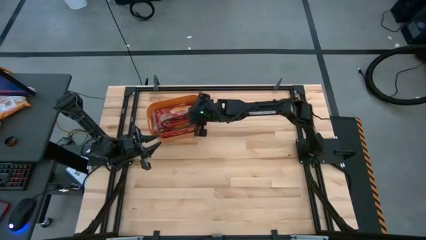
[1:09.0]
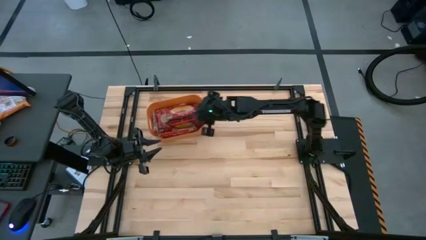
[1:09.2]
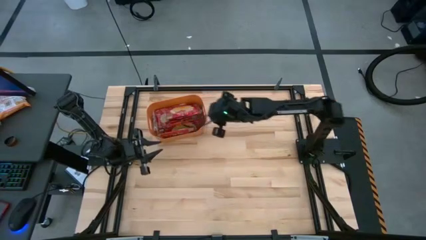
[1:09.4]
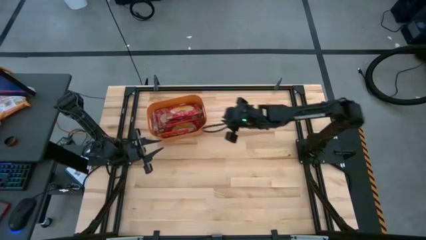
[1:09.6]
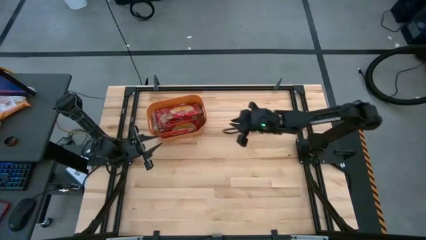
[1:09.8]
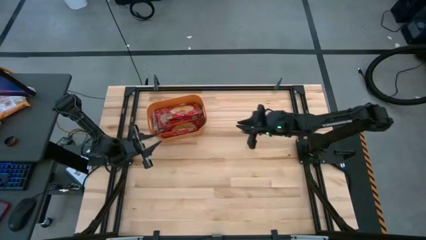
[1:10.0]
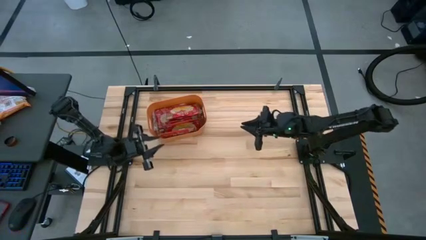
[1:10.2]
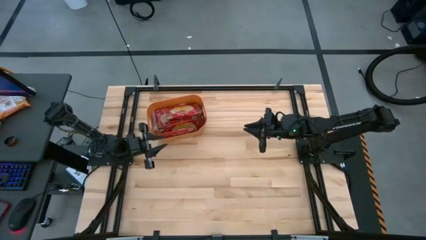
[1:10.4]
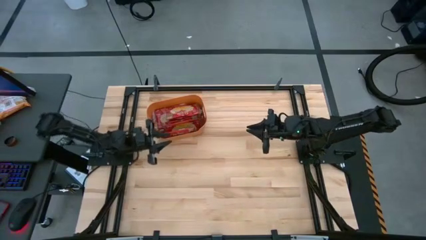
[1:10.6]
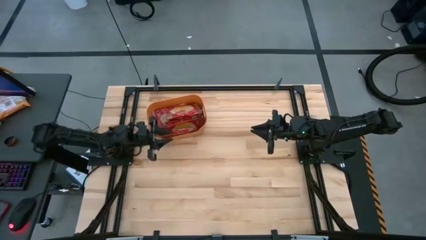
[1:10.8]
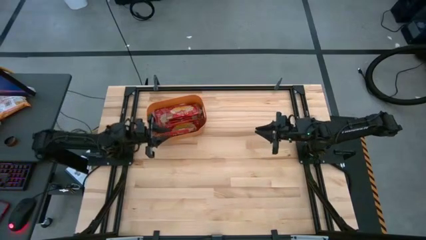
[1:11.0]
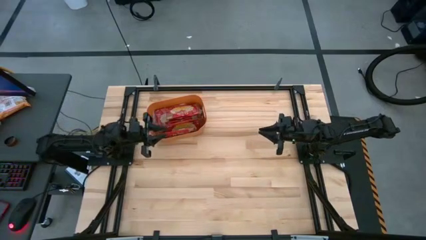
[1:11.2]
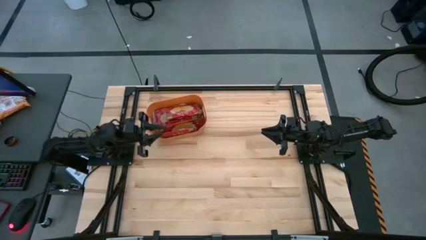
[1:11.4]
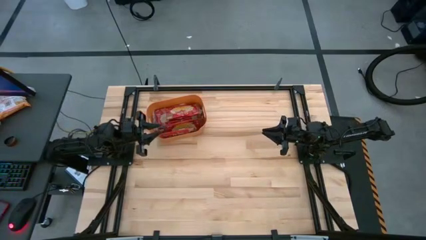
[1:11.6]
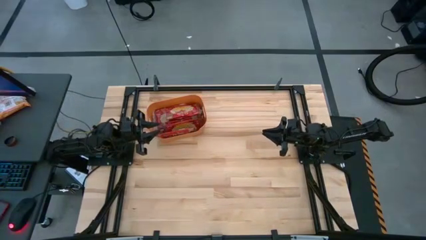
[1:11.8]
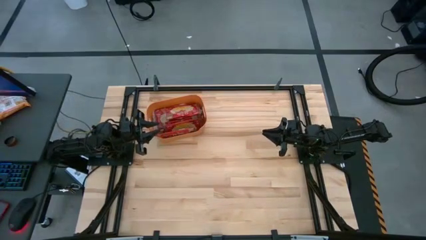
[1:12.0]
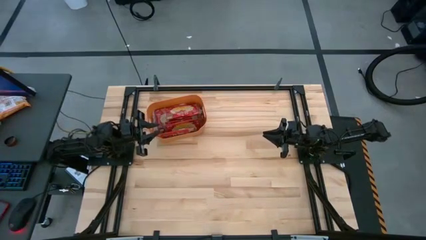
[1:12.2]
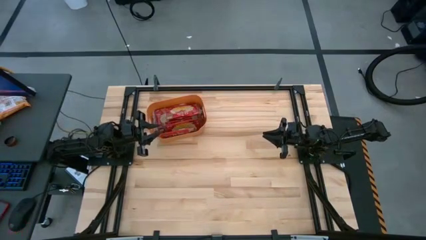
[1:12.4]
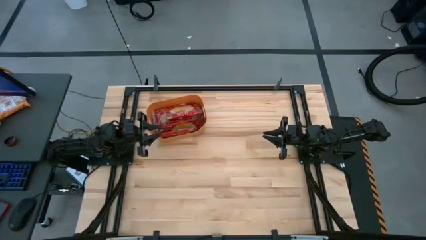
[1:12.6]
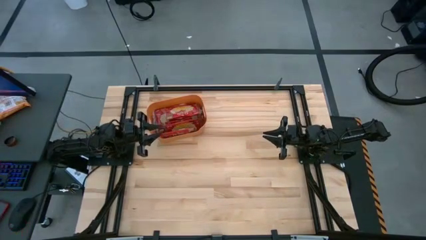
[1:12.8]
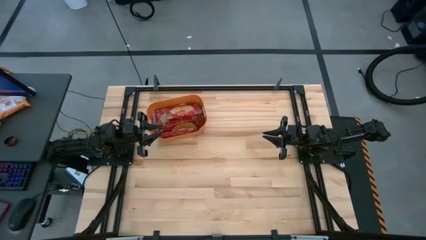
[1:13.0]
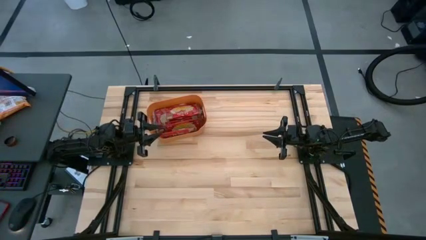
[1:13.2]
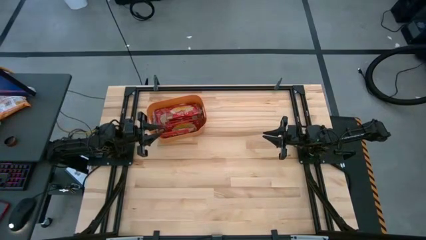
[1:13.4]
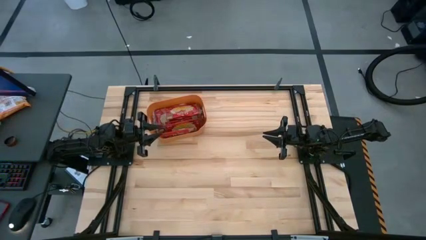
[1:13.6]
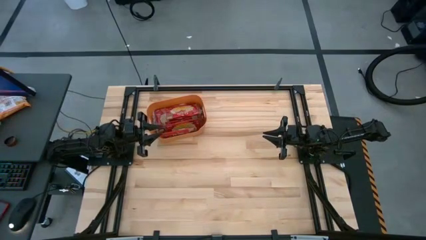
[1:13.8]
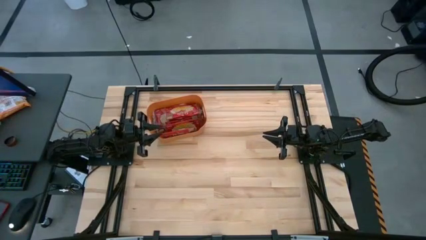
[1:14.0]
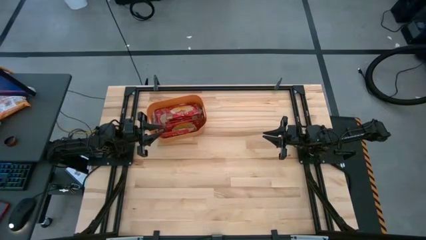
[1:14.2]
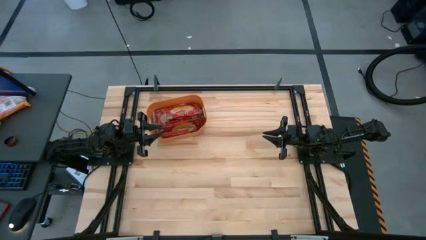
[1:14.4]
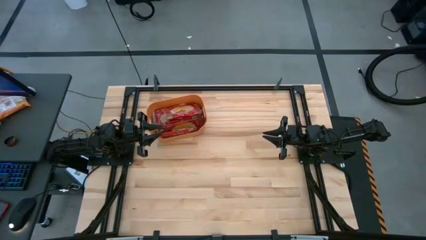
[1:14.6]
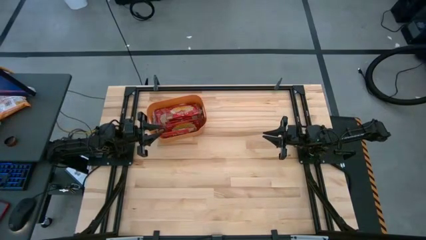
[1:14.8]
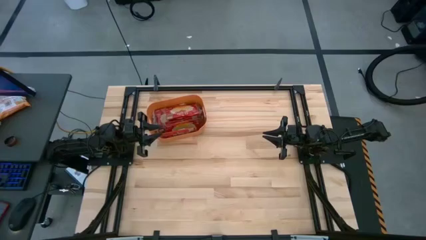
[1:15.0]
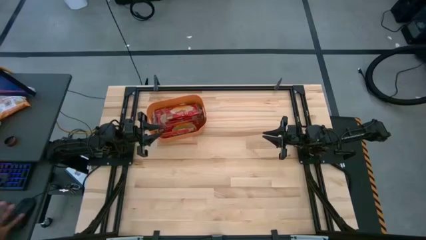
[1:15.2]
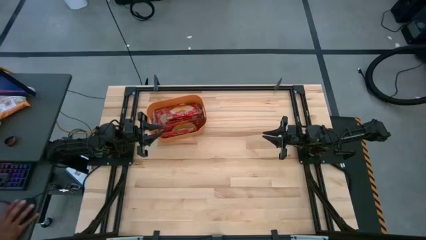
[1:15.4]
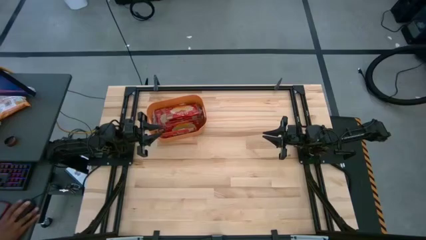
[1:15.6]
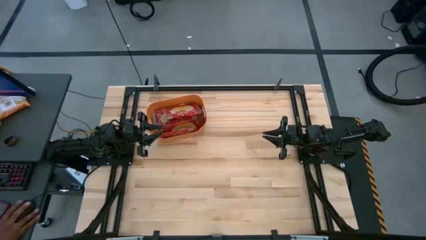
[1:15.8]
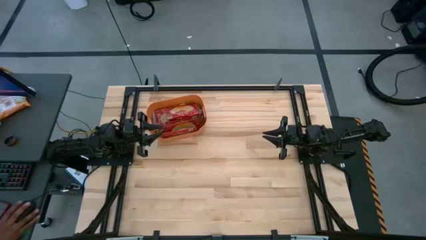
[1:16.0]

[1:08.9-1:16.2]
Task: Sort popcorn bags into baskets
Return to Home Position

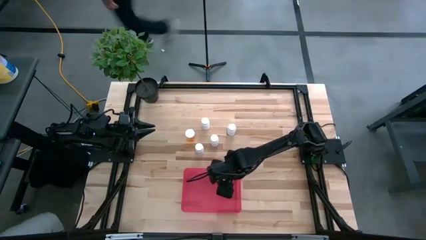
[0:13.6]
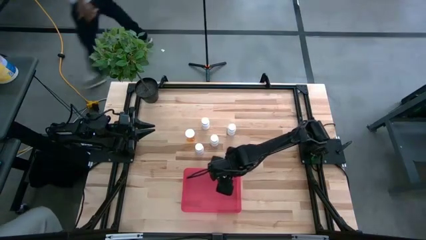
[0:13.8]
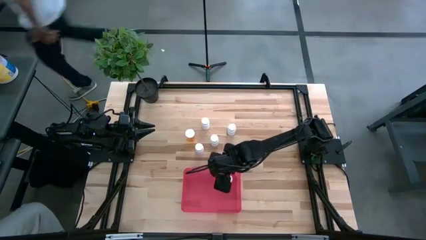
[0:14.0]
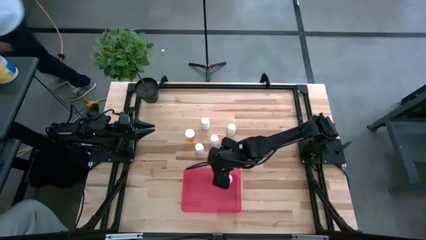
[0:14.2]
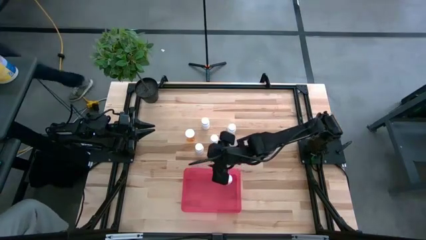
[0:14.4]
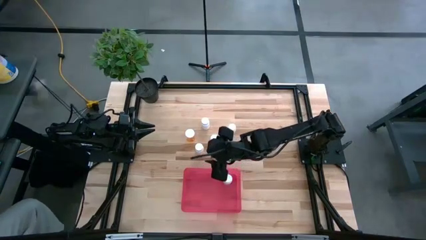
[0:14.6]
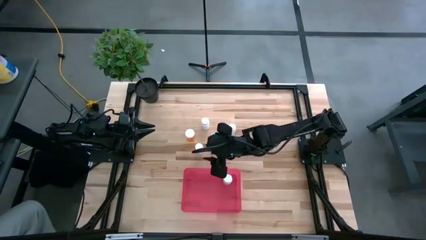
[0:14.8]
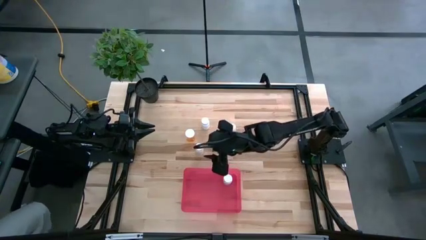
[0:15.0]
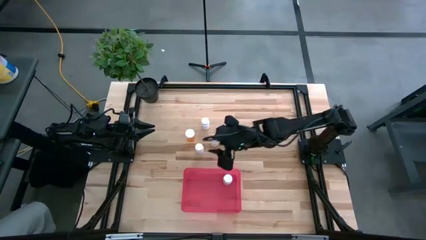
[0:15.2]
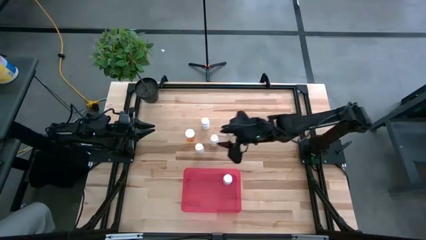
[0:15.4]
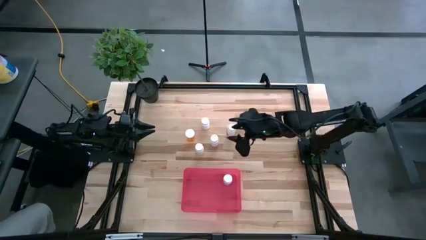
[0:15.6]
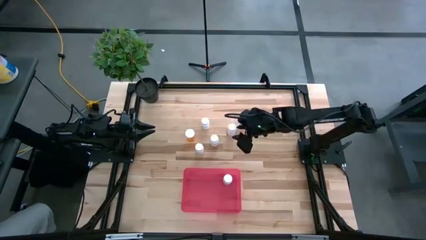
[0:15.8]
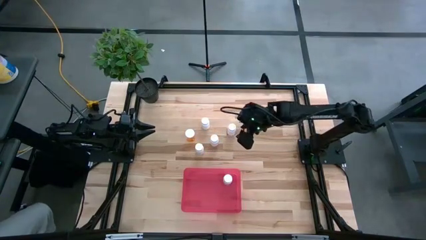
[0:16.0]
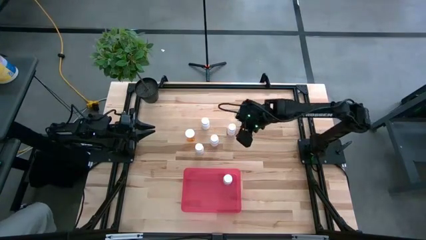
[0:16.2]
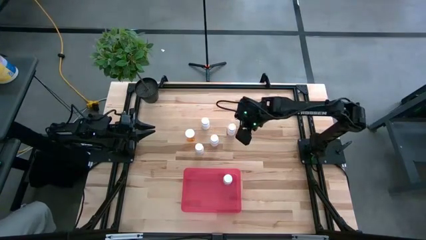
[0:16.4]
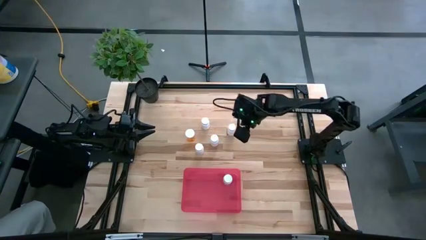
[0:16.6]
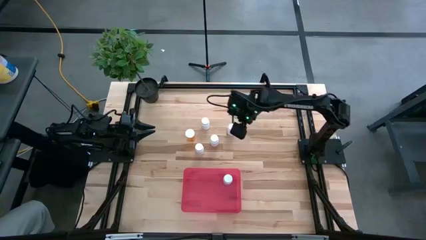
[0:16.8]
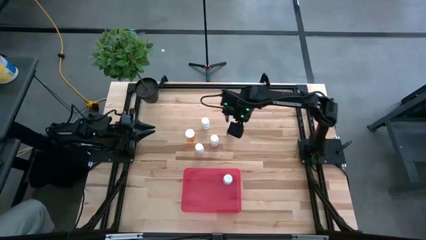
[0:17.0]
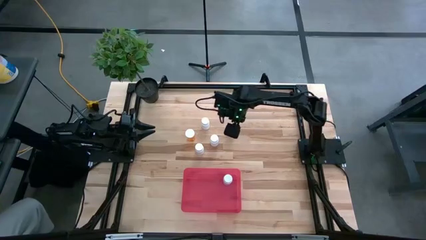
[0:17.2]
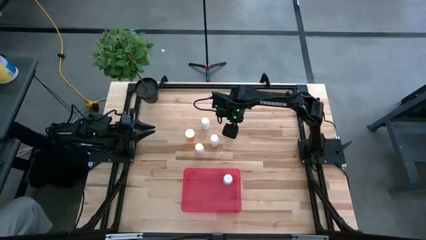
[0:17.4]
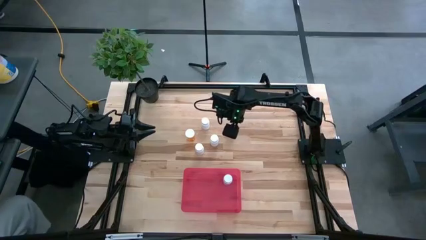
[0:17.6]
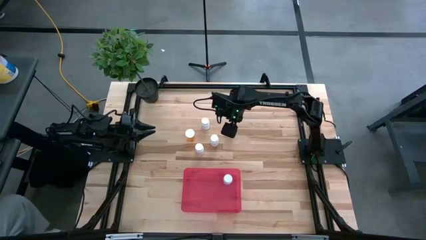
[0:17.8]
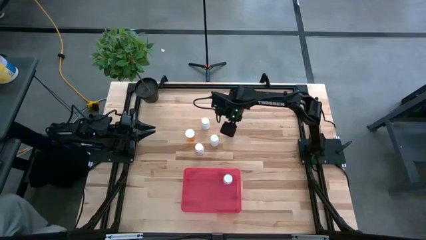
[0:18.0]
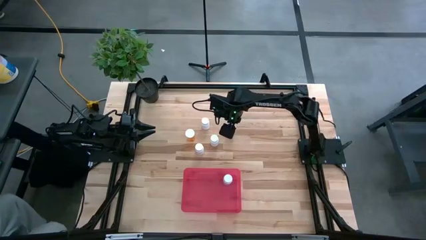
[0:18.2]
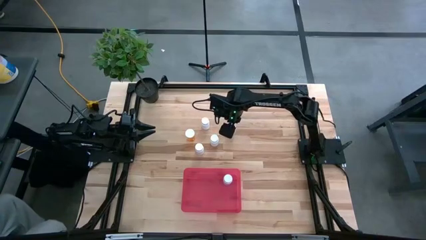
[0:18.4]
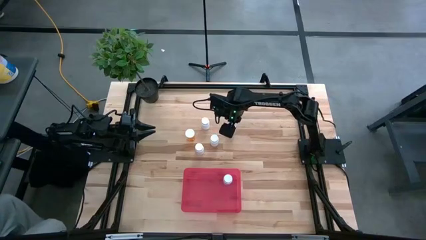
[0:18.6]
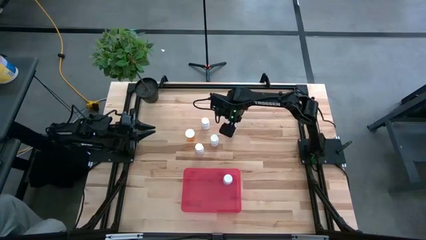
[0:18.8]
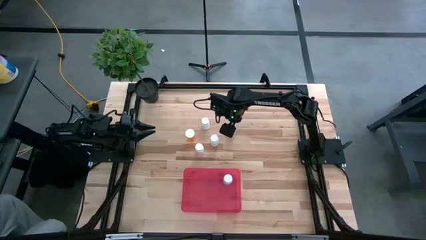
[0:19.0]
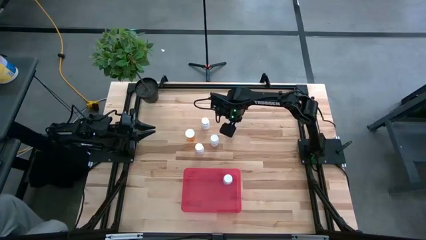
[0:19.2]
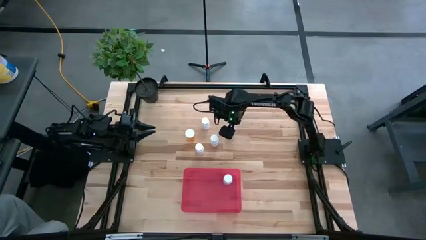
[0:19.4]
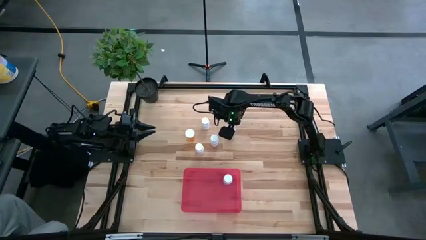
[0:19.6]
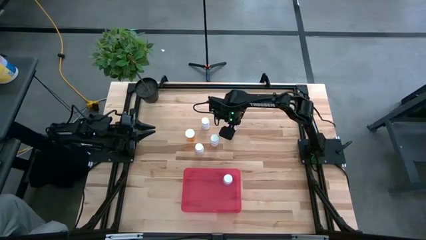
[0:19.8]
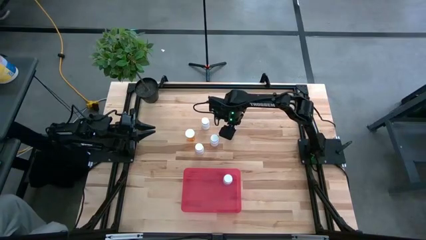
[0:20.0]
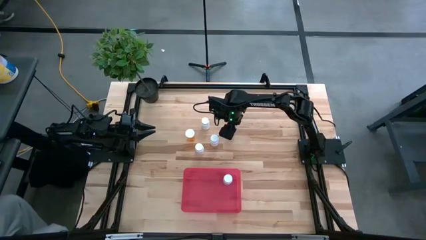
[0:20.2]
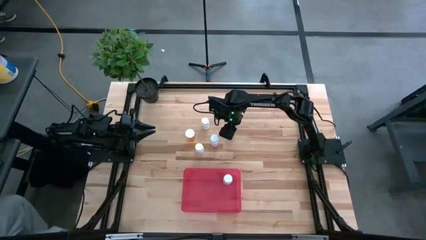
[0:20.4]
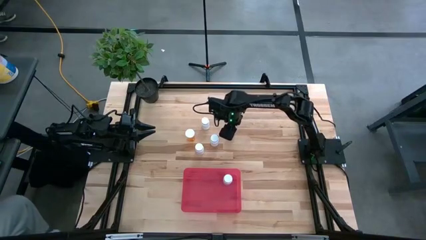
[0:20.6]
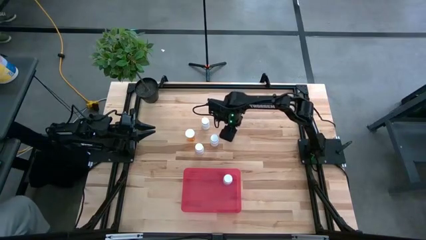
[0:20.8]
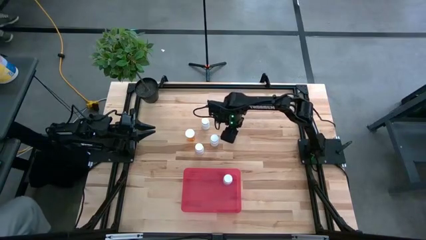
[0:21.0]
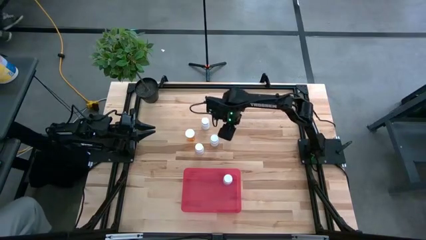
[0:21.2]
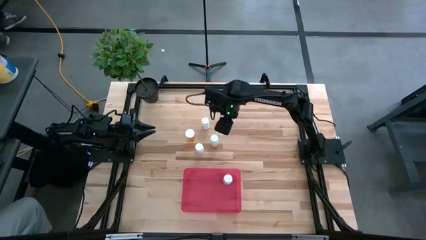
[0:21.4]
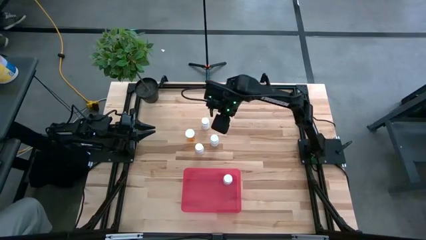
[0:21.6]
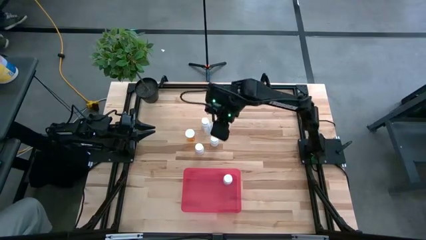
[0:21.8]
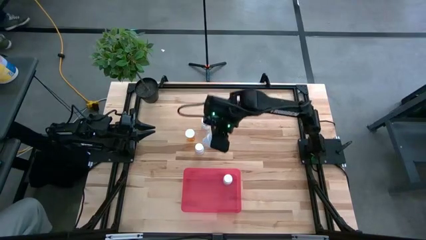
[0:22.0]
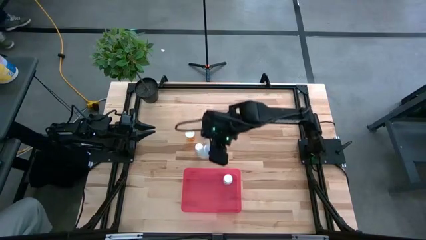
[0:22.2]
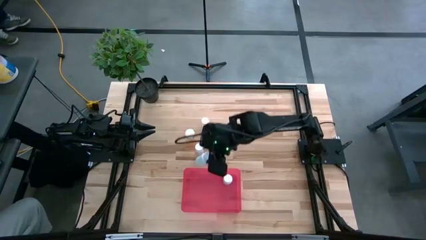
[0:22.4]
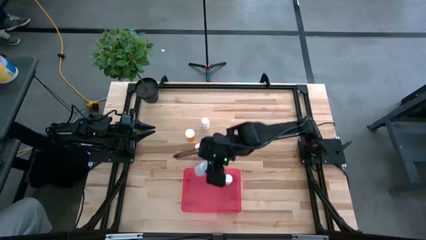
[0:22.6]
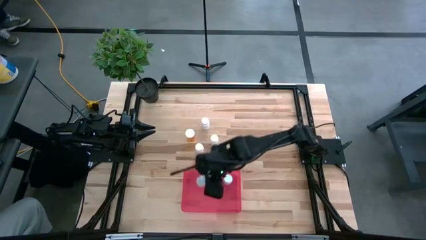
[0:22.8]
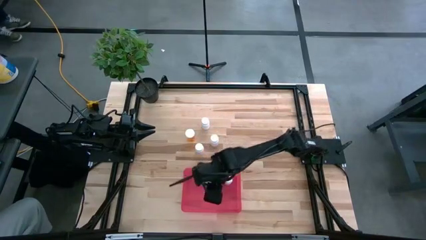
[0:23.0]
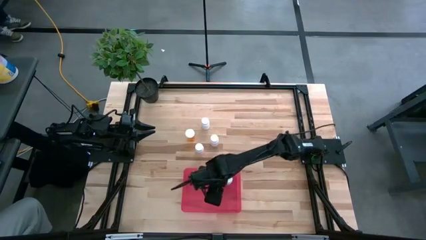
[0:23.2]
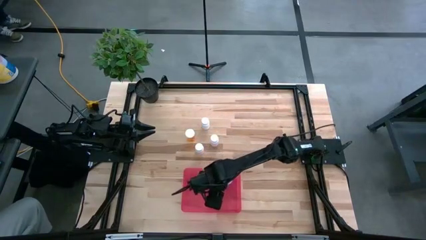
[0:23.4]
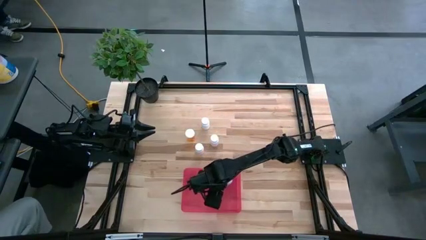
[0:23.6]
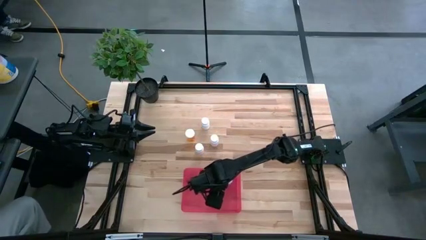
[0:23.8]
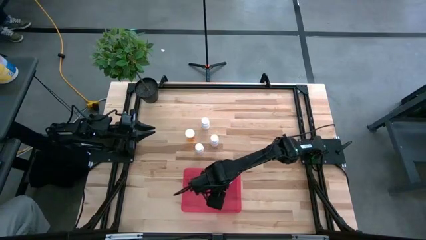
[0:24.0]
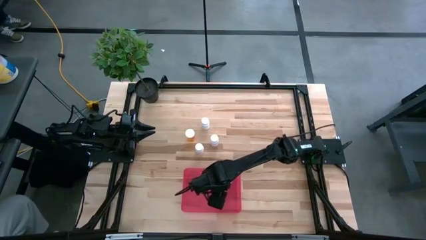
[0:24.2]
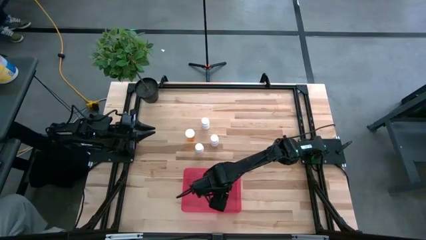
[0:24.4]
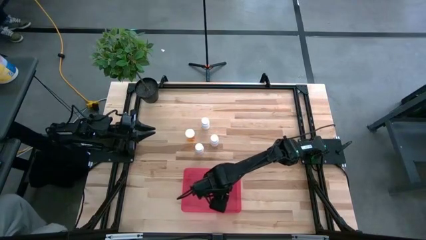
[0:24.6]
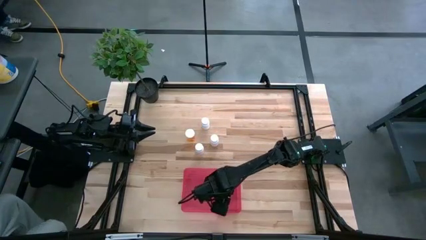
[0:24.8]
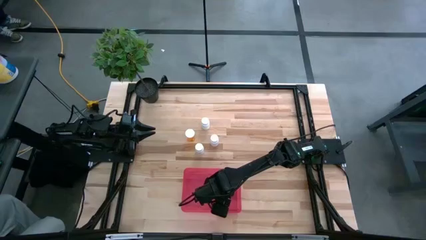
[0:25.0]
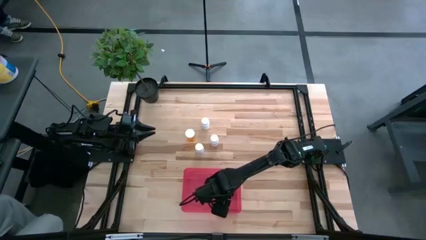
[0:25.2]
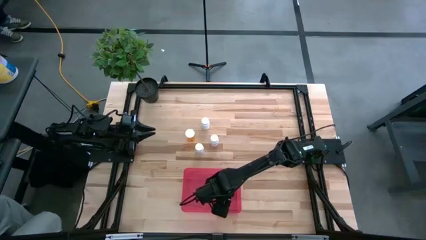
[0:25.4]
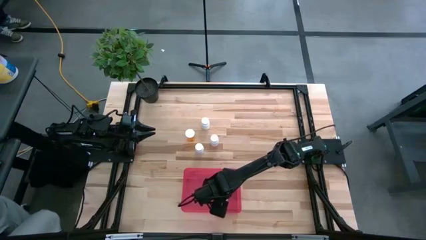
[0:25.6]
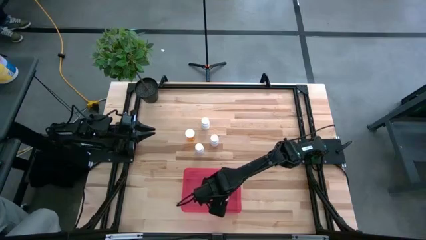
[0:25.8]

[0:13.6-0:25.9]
Task: Pick and place pill bottles into a basket
Put the white pill bottle into the bin
